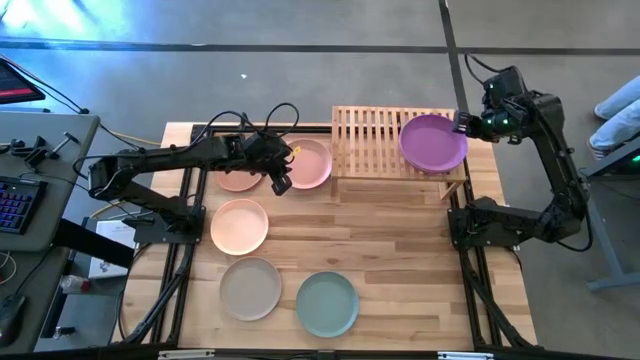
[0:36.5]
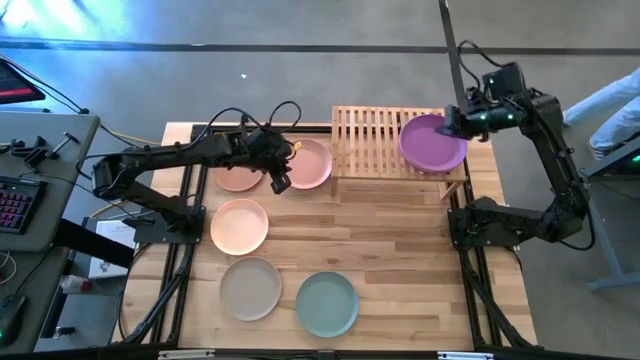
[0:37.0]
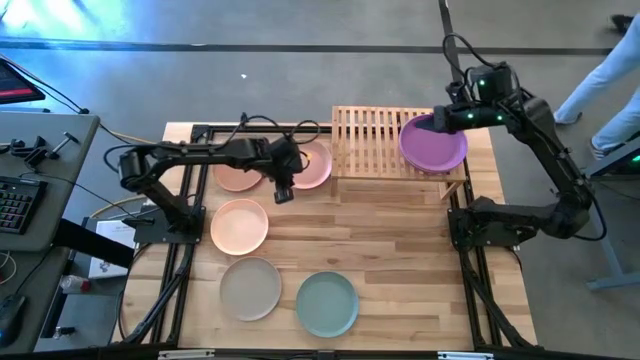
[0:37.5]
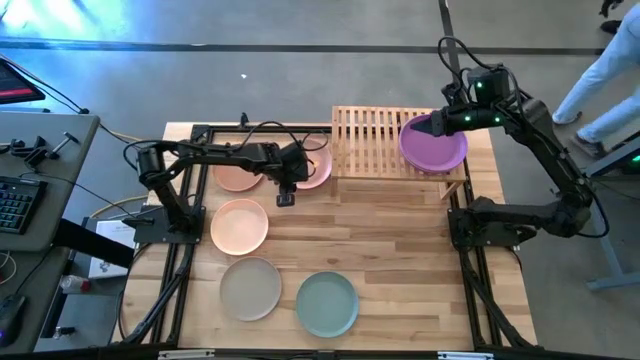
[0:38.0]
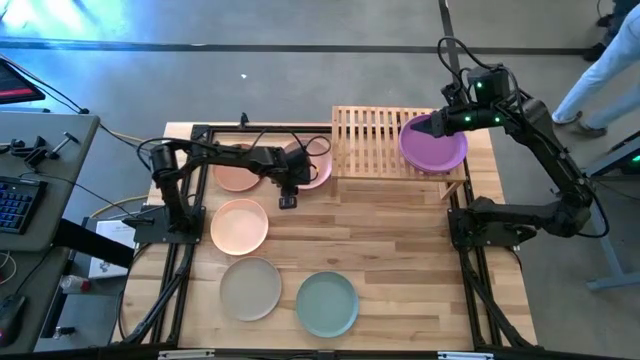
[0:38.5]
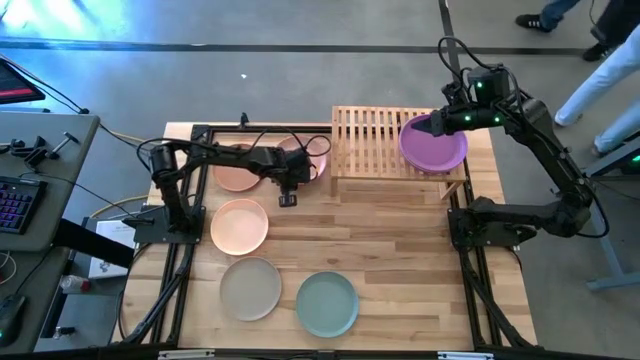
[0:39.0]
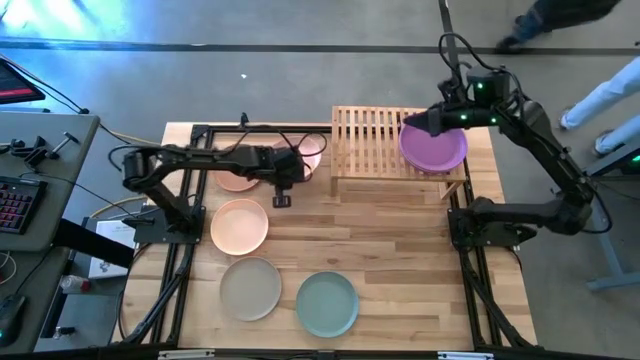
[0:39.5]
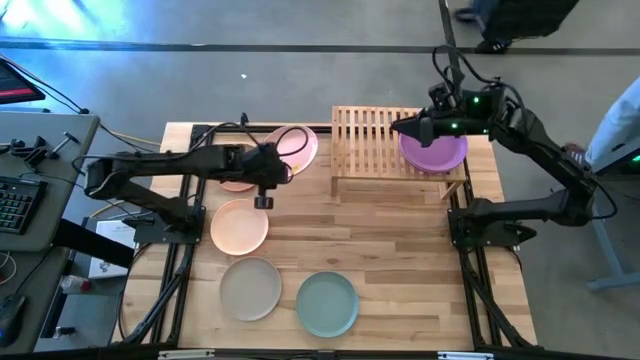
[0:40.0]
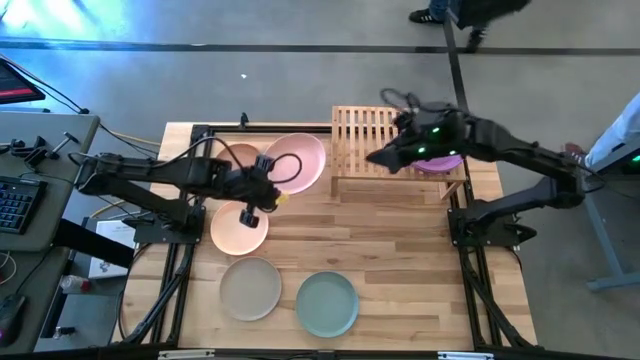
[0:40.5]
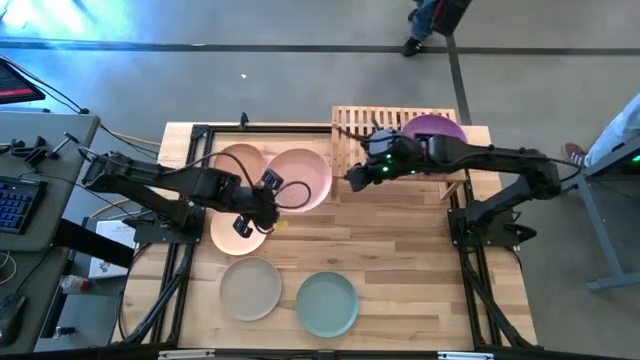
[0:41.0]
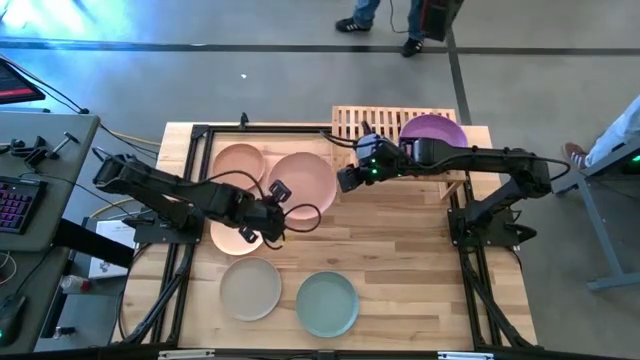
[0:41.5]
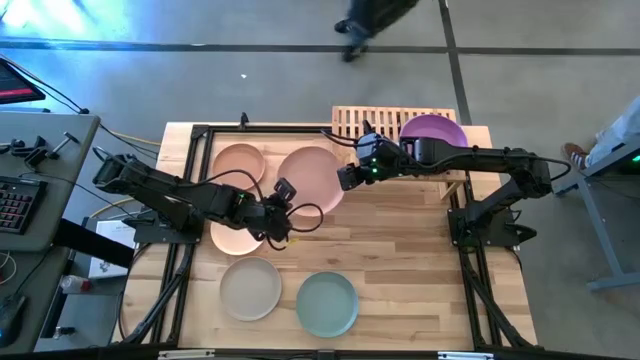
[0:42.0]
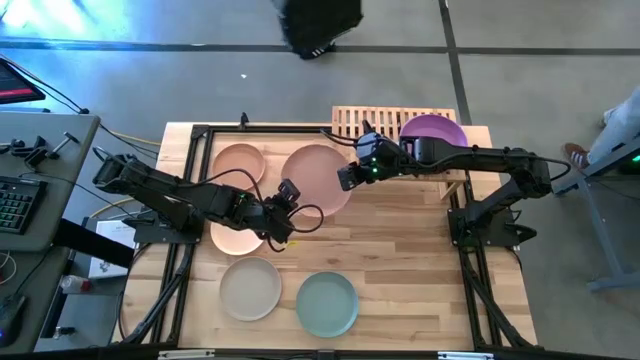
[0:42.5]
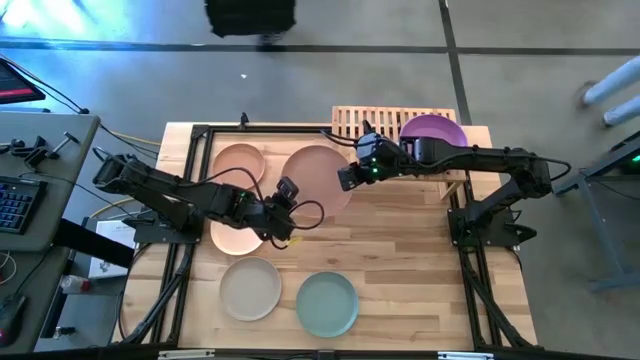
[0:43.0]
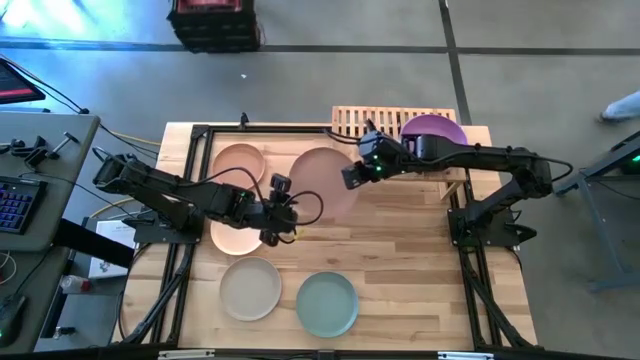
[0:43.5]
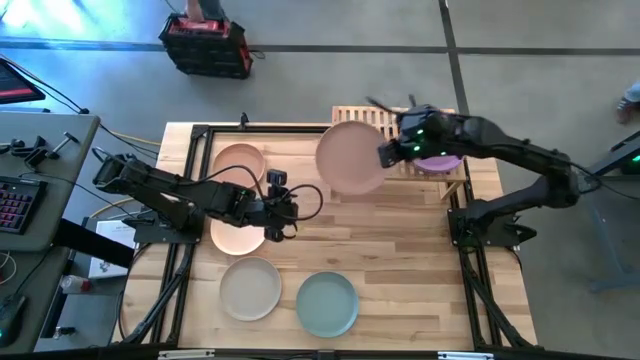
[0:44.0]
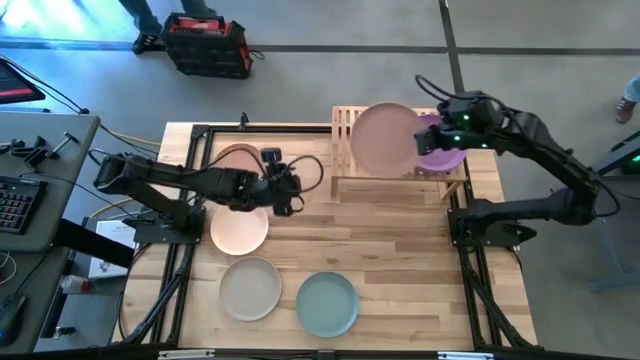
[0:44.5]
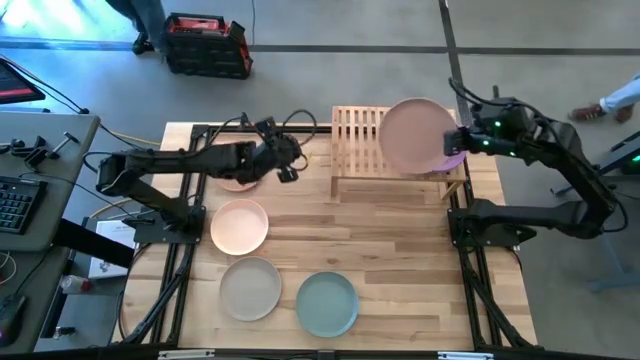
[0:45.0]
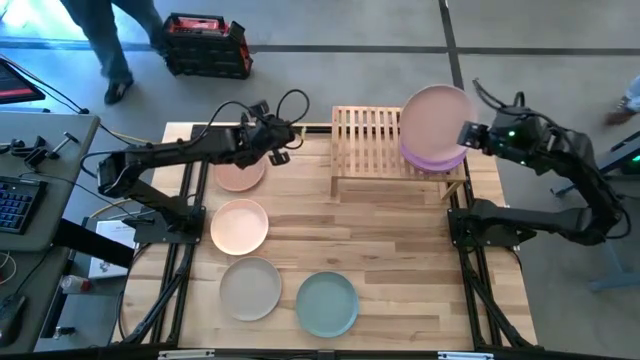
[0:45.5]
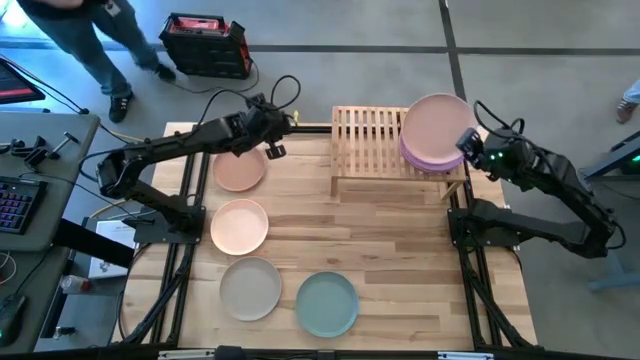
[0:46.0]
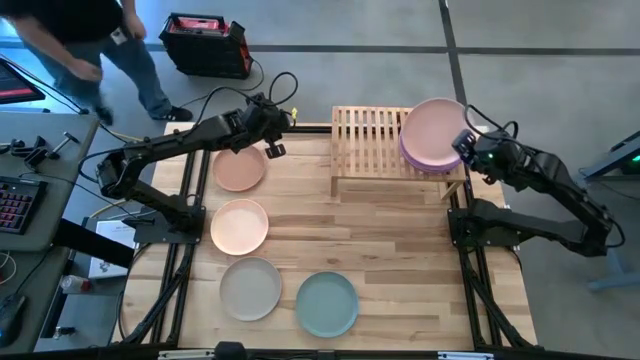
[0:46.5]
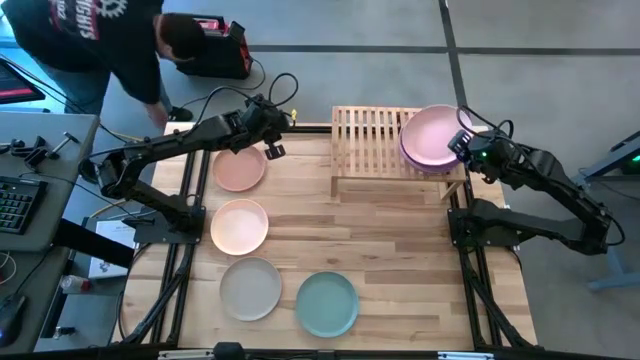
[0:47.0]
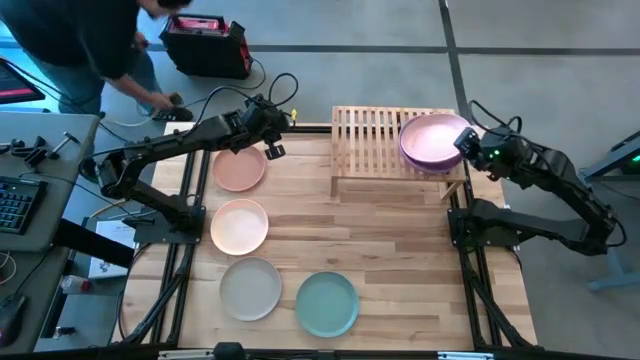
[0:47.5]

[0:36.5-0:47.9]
Task: Place and stack plates onto a shelf
Stack the light brown plate on top of the purple plate on the shelf

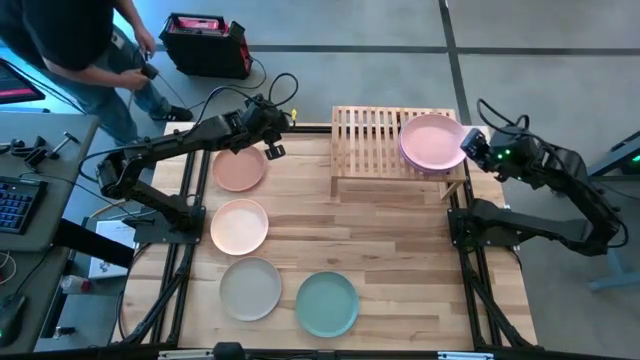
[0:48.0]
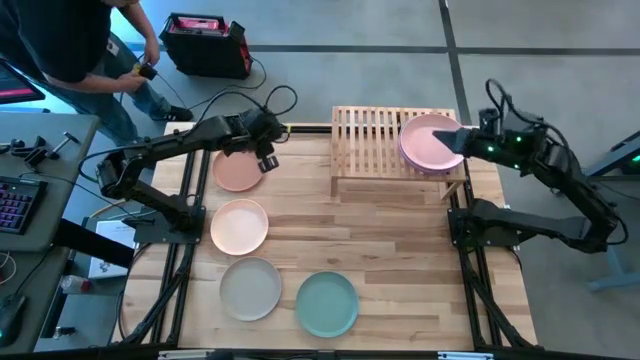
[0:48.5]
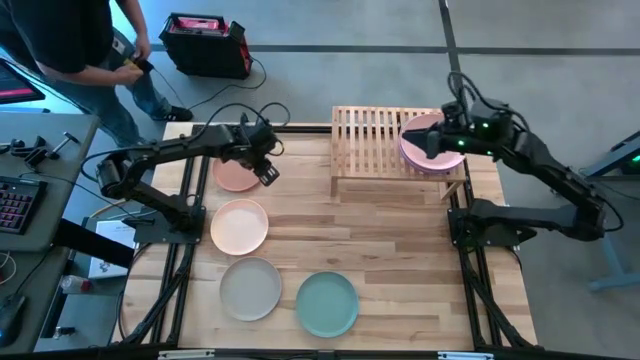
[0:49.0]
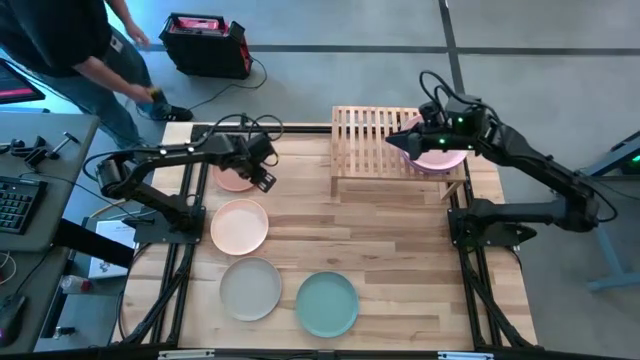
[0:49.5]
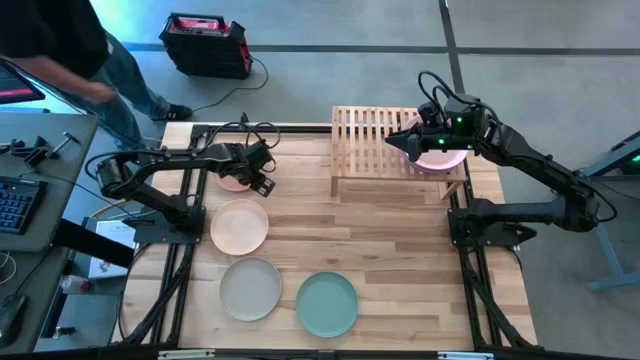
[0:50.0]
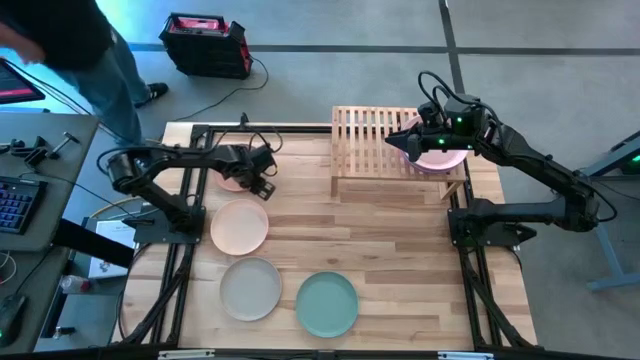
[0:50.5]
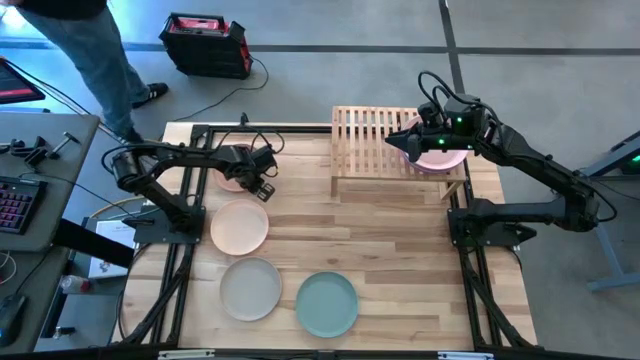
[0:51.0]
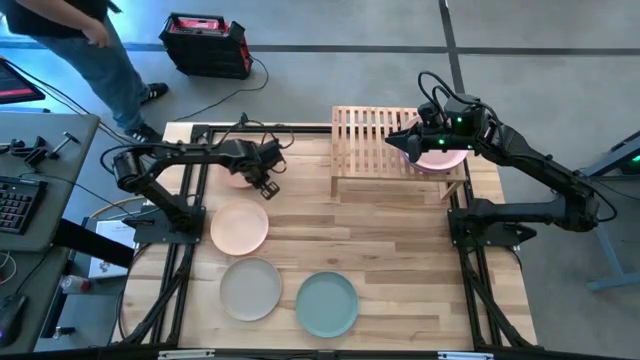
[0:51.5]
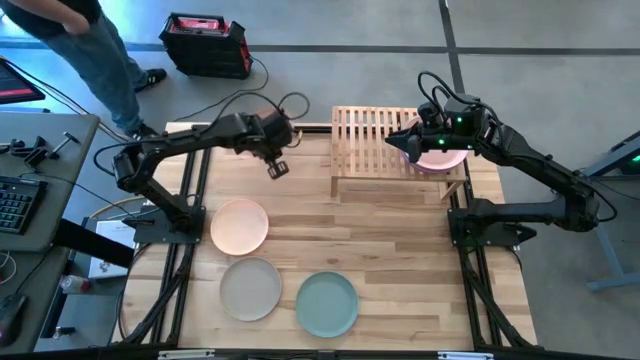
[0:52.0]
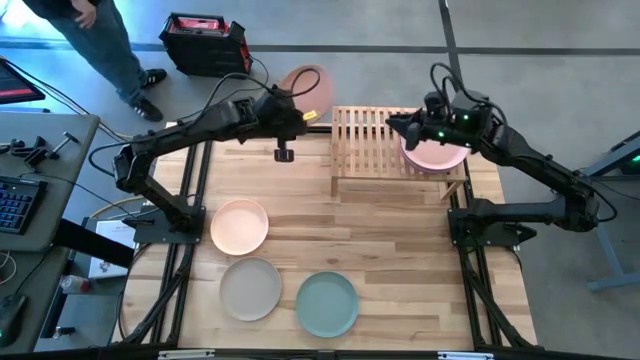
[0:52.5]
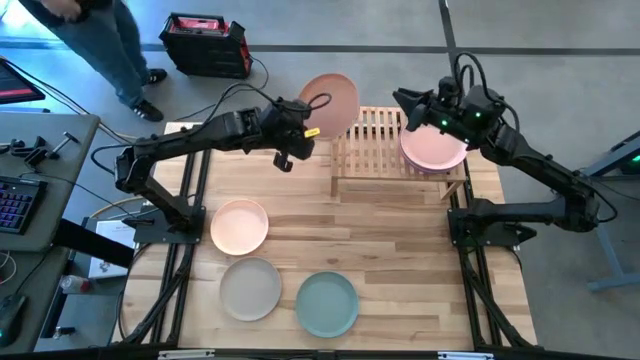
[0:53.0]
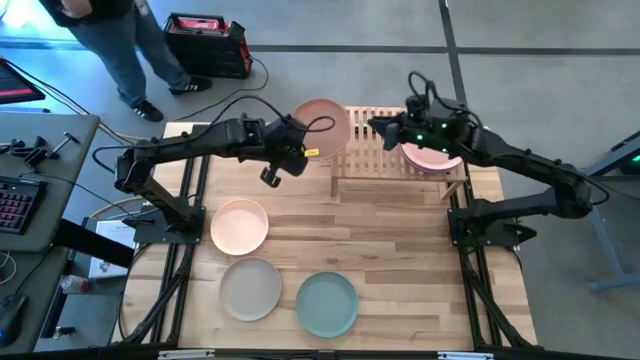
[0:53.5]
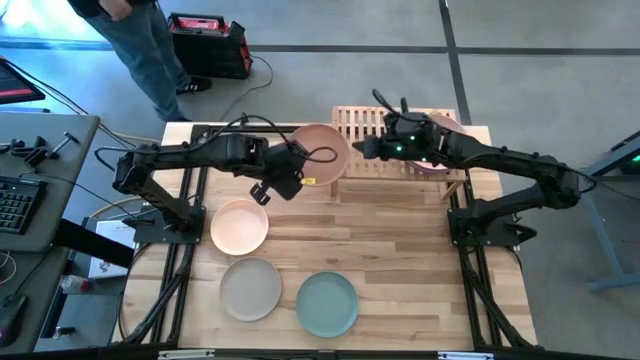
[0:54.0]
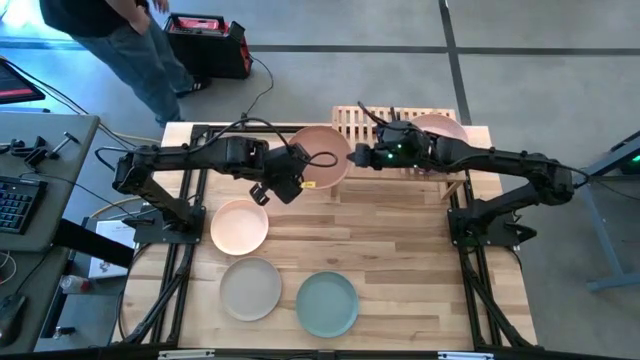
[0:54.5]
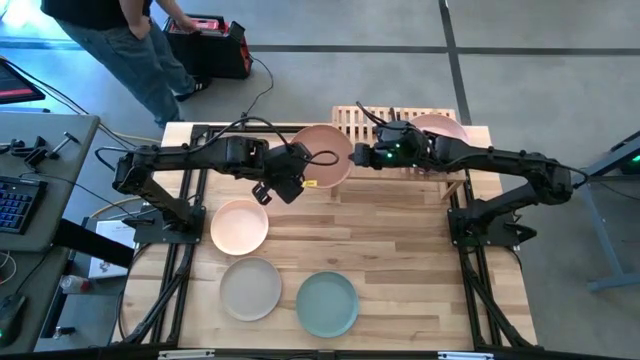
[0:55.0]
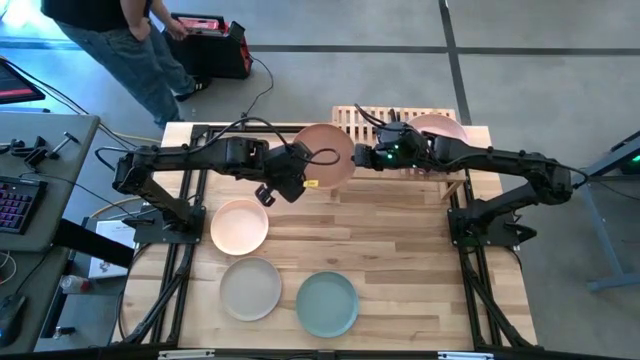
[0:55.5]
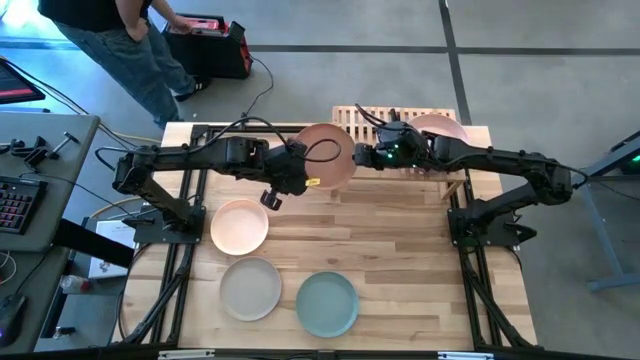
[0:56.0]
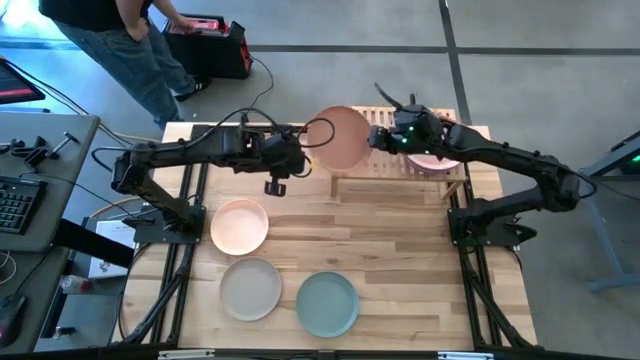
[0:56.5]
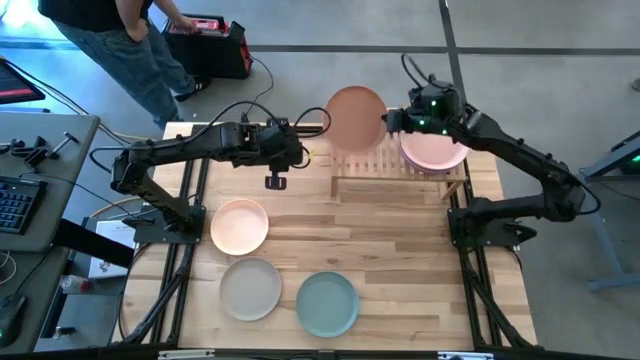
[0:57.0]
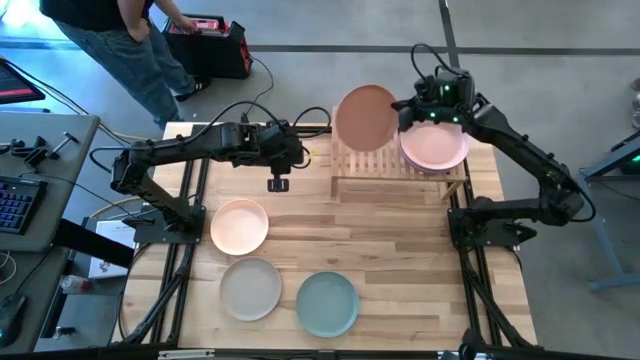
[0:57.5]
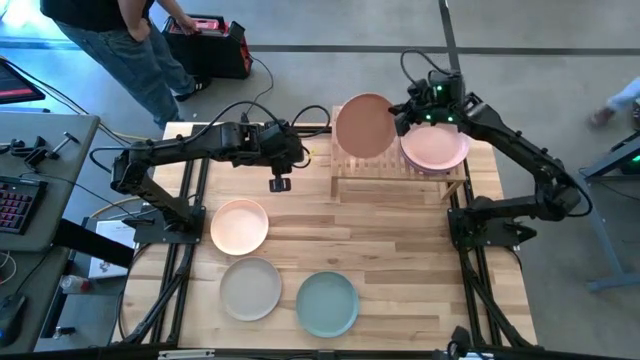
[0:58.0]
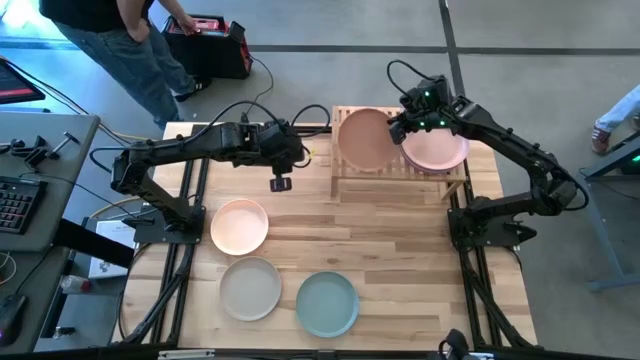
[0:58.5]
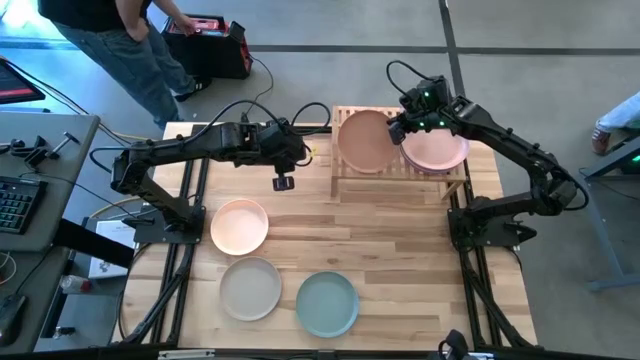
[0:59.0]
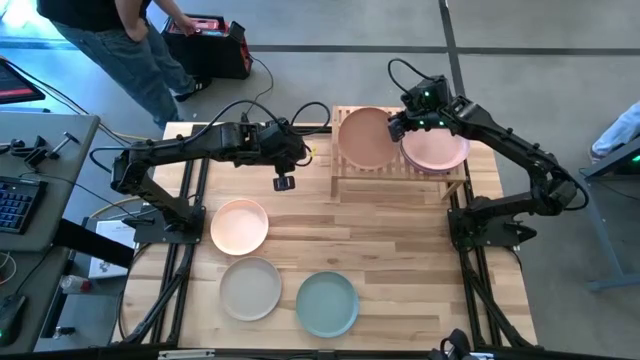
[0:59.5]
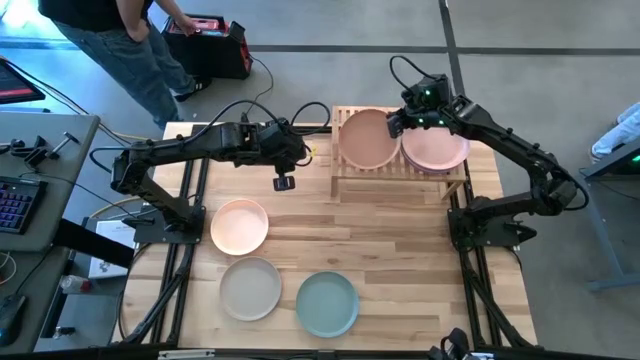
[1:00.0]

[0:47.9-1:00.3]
Put the brown plate on the shelf
